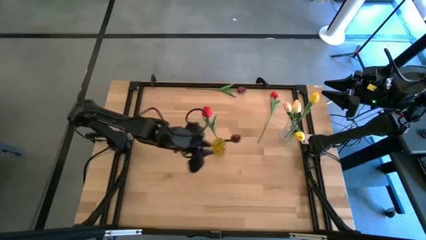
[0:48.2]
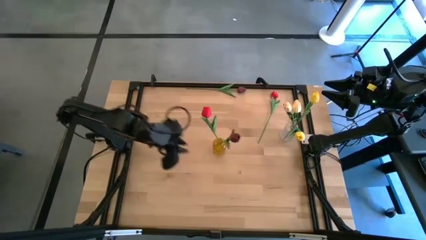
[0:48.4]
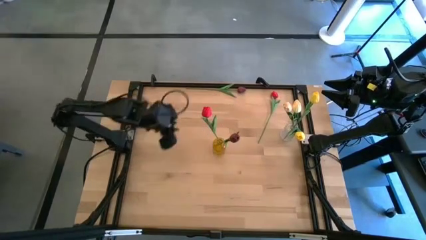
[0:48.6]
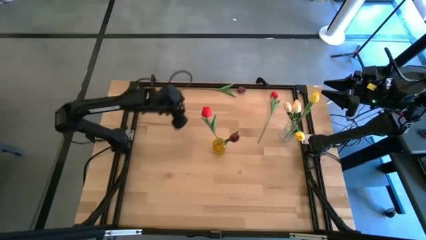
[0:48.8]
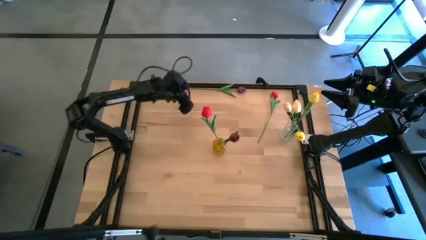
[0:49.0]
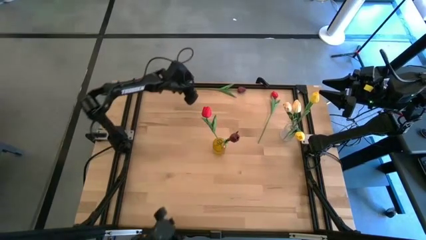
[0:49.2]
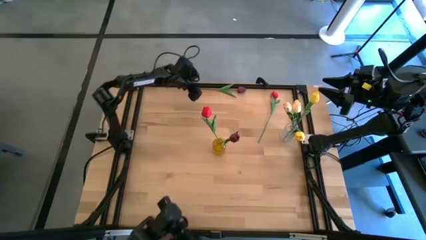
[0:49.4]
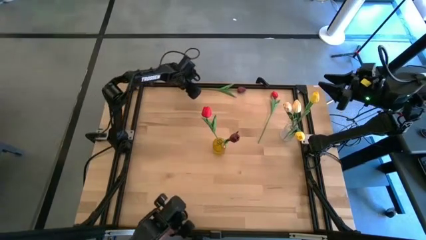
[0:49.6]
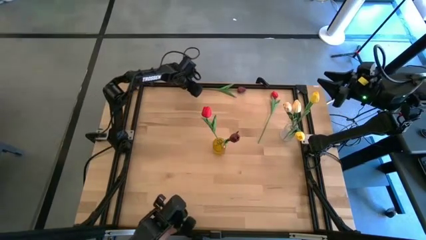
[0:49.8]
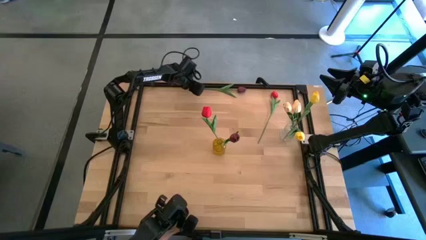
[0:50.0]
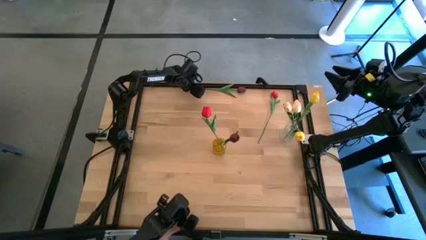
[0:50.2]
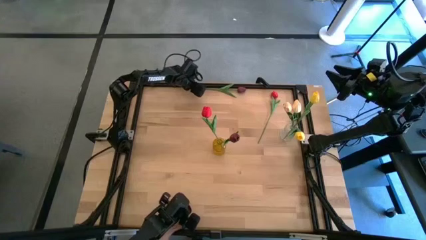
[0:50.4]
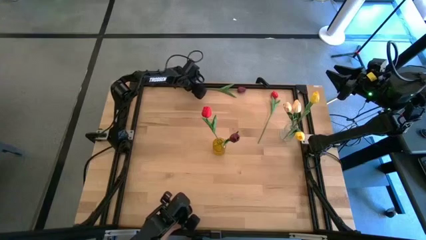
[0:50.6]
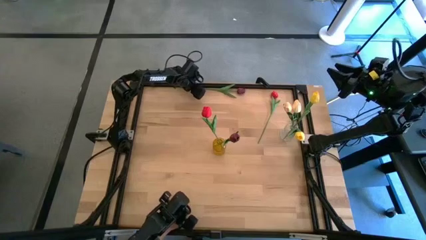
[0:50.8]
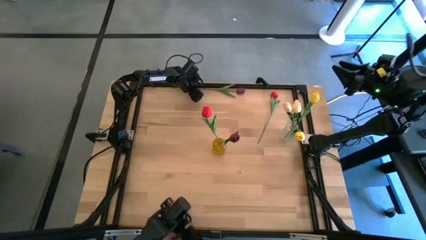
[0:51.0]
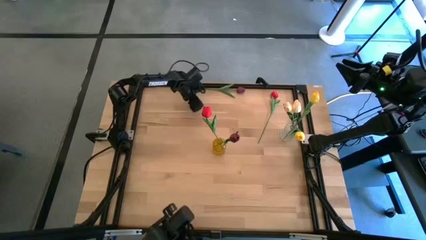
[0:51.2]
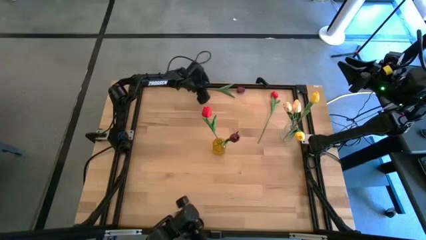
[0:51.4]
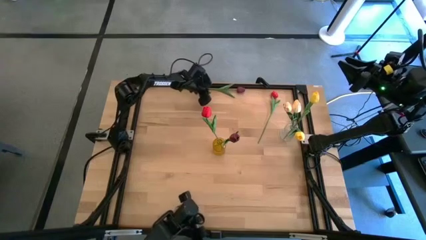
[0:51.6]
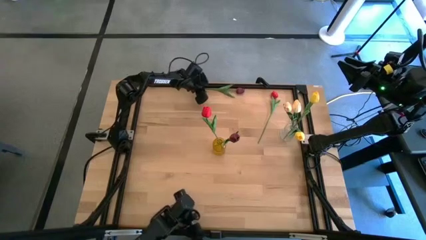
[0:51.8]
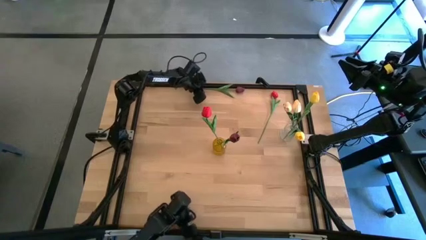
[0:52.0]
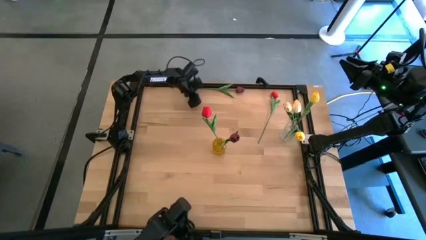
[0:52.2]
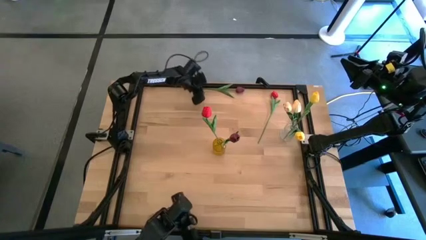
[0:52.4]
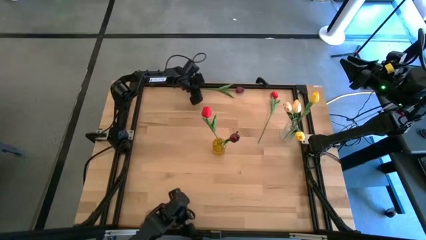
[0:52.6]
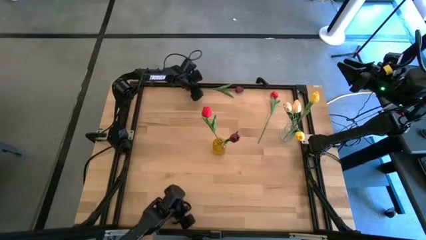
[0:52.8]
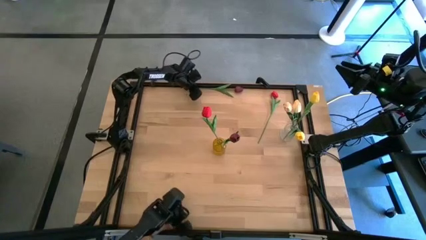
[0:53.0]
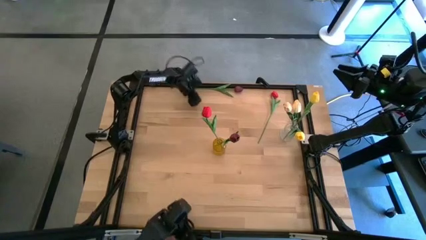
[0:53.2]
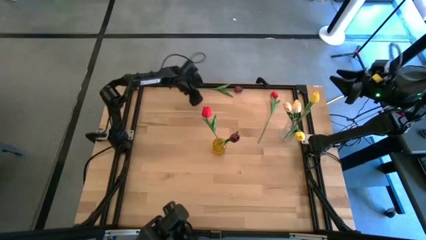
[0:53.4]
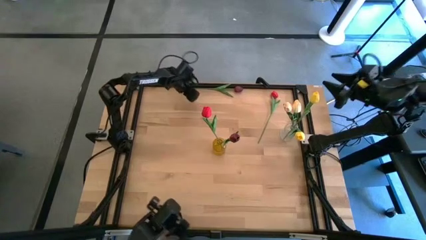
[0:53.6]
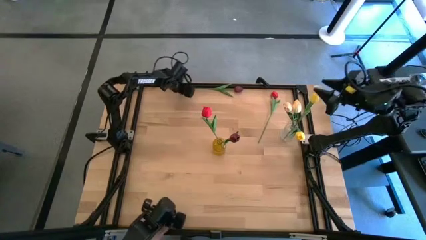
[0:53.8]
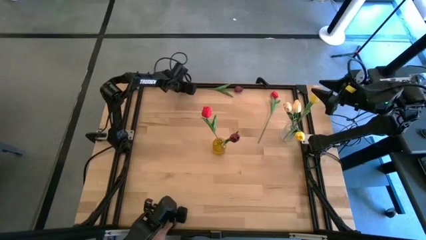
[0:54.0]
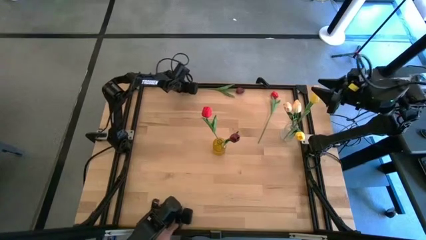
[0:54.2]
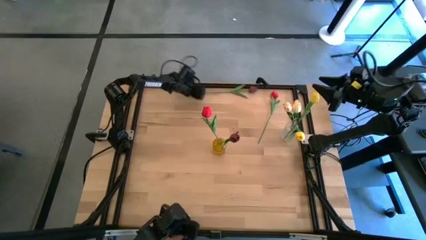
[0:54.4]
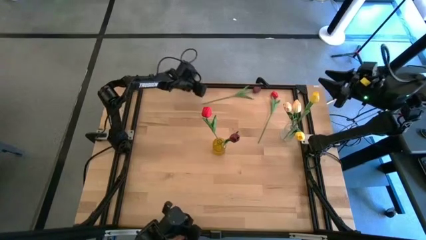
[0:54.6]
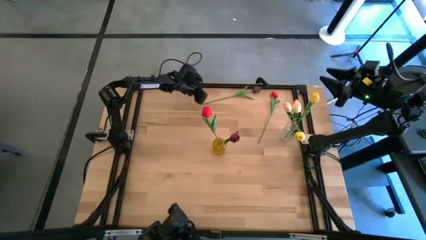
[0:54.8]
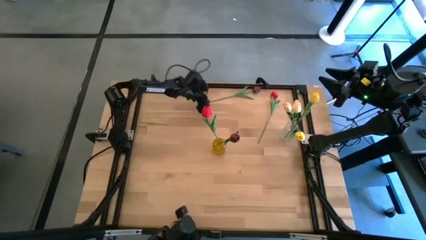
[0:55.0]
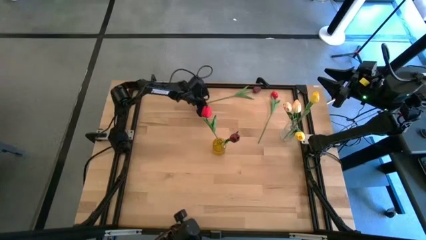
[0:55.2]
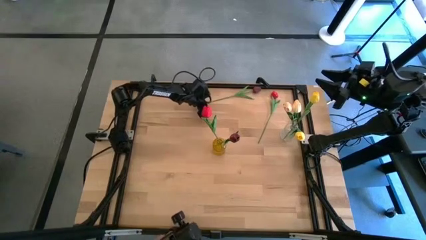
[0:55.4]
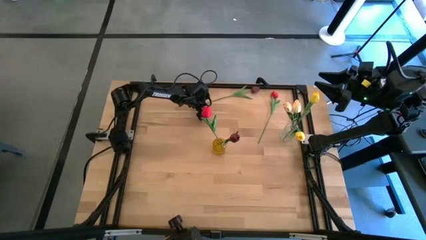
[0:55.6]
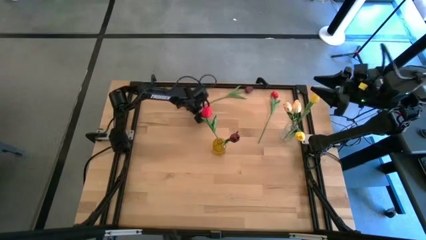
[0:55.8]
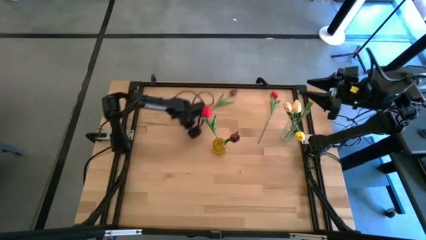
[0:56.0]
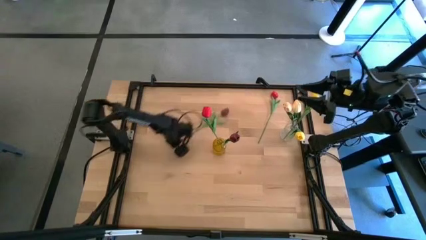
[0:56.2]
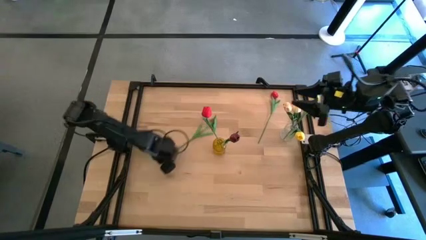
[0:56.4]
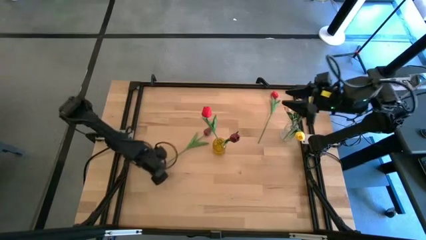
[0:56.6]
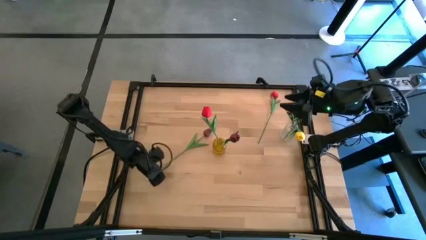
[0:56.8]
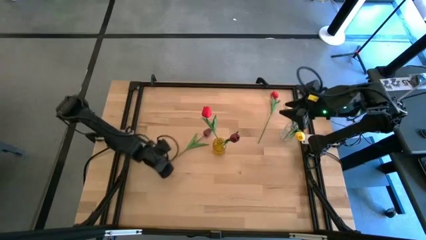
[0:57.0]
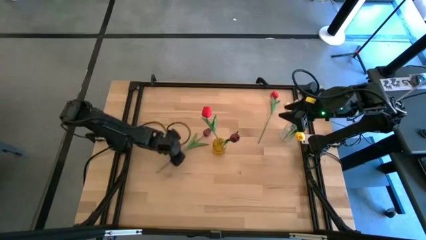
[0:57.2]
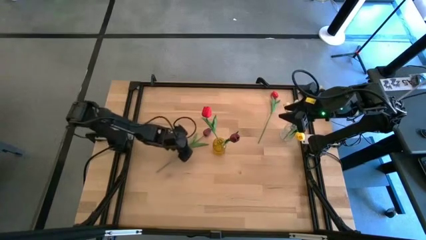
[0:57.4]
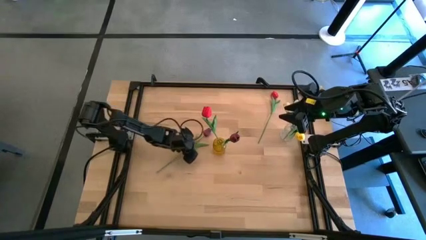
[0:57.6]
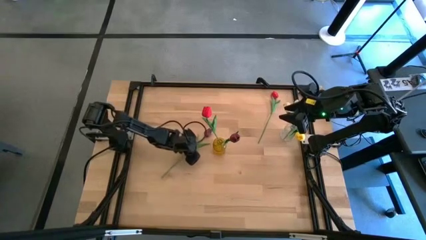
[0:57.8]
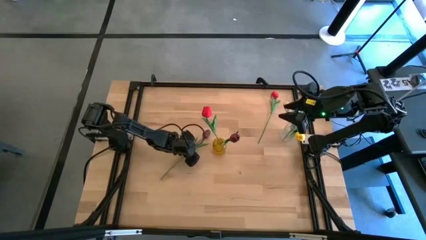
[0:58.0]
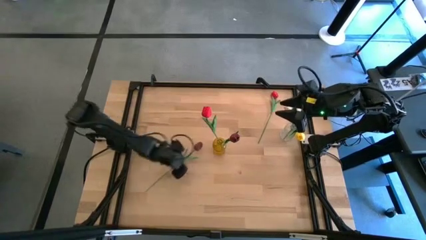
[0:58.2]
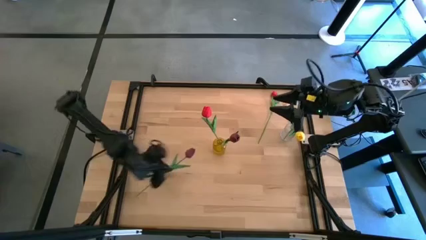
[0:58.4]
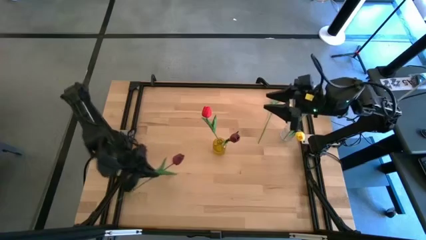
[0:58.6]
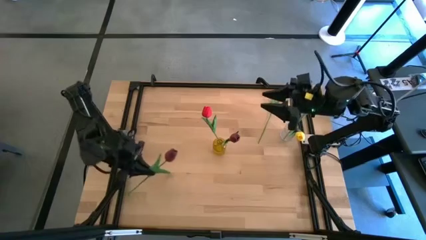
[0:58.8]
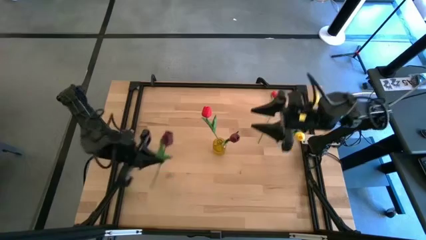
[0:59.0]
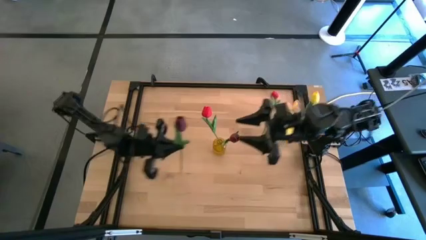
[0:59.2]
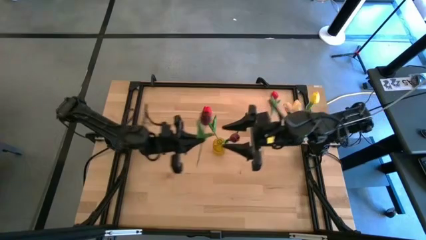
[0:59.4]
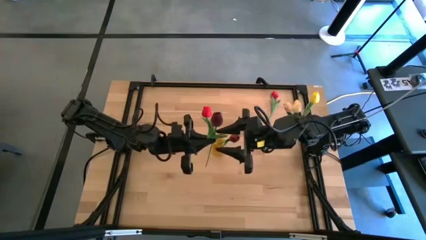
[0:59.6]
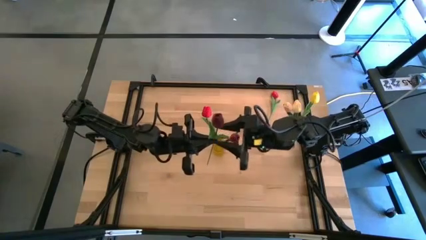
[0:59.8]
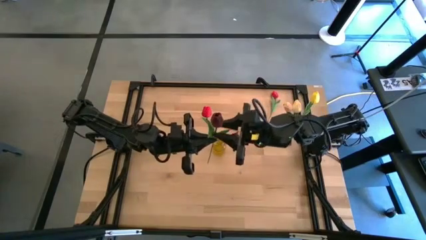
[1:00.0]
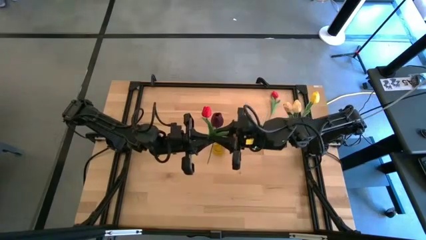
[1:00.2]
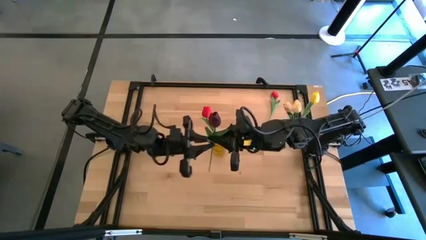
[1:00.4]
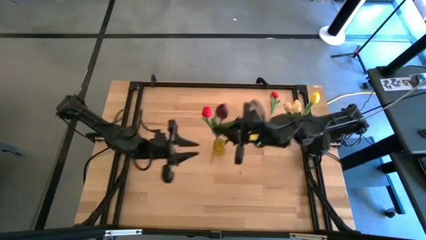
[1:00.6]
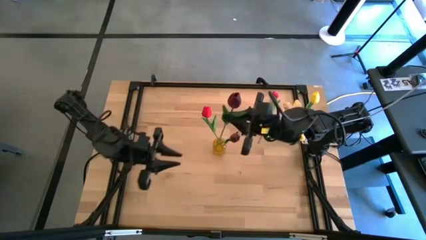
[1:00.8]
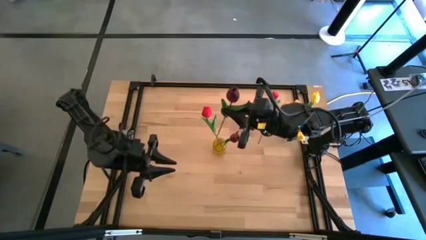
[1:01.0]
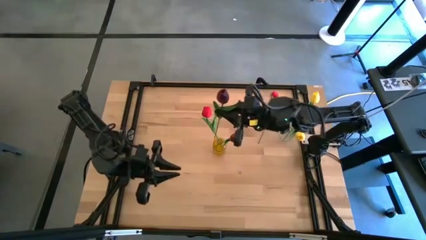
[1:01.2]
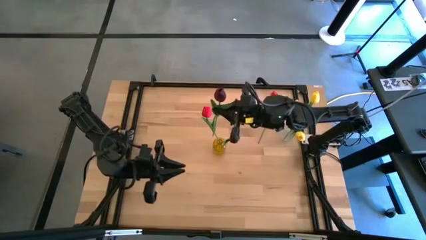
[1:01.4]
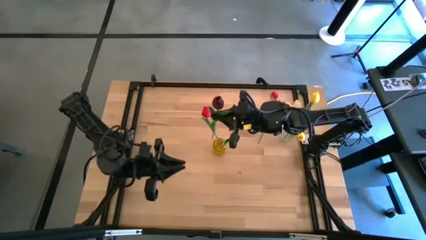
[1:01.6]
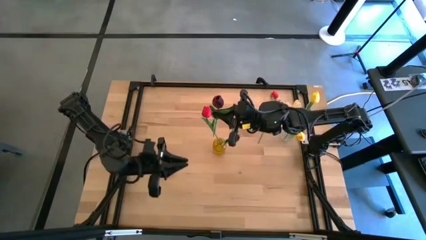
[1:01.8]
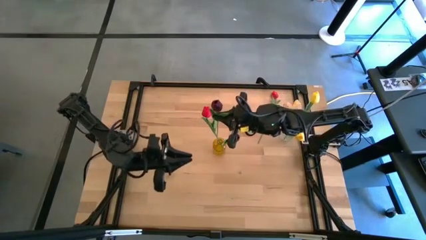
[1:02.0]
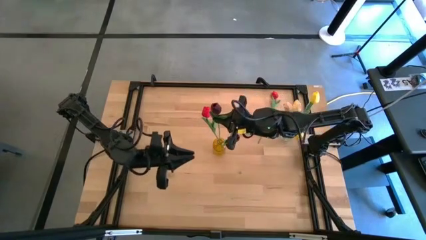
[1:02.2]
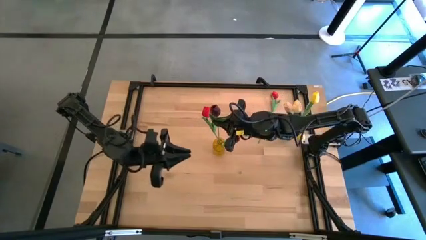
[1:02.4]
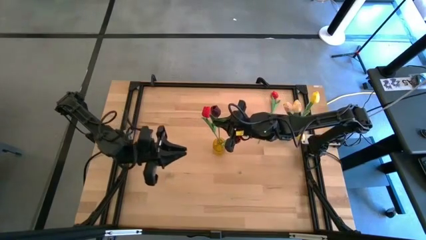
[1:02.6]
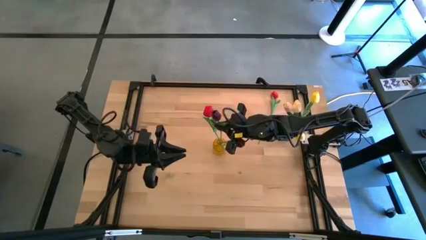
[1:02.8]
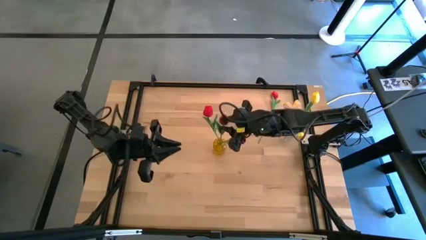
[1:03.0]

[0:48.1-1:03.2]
Task: Sort flowers into vase by color
Put the dark red tulip into the yellow transparent vase
